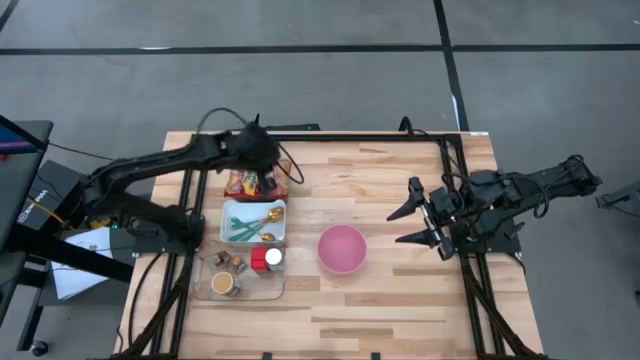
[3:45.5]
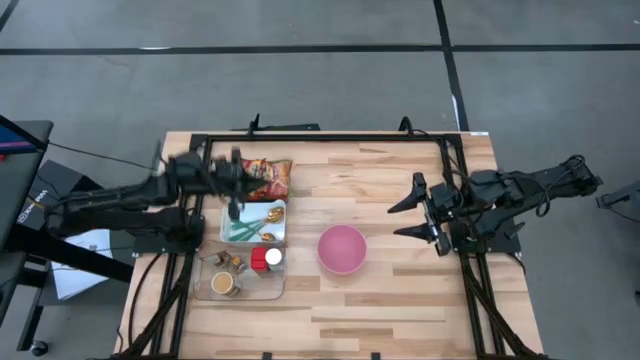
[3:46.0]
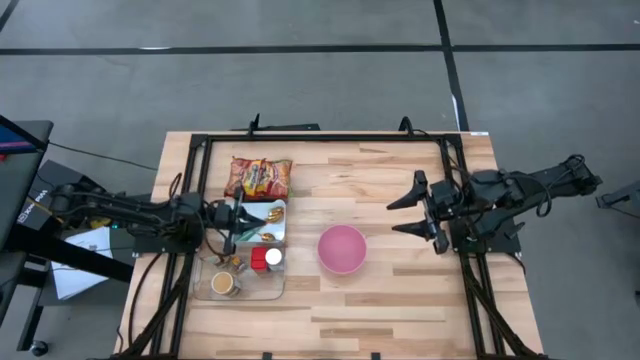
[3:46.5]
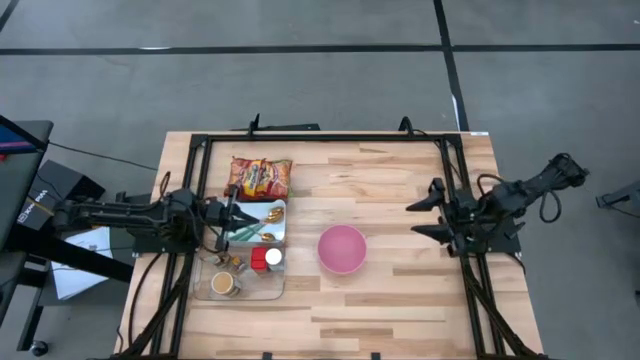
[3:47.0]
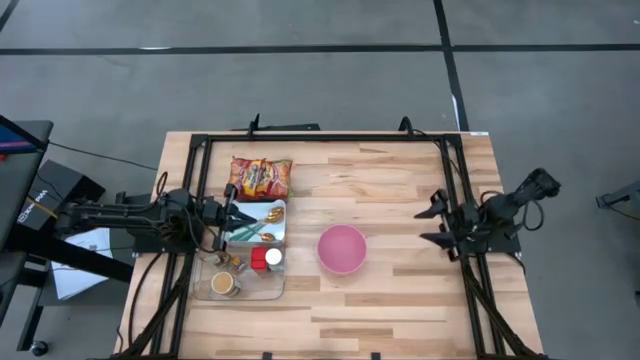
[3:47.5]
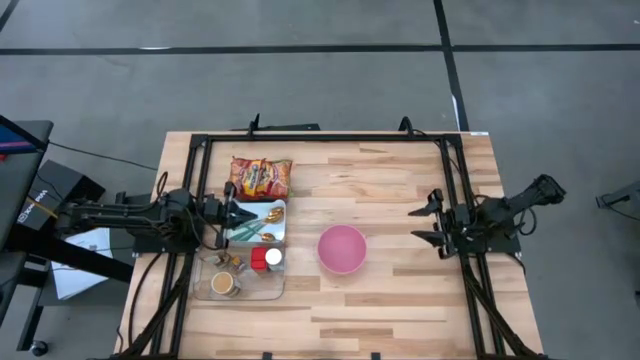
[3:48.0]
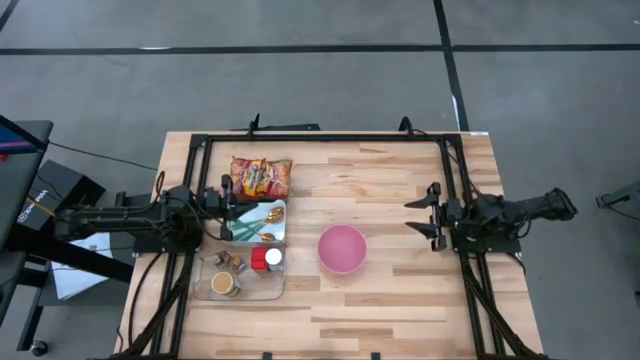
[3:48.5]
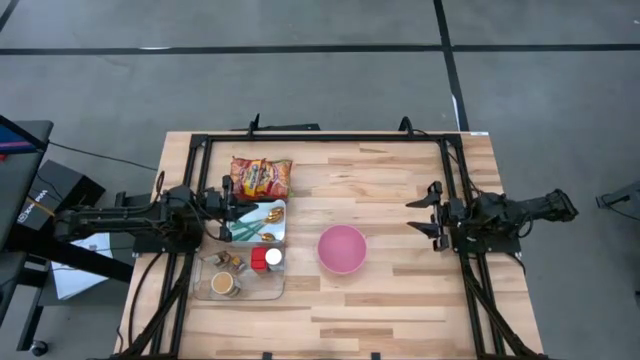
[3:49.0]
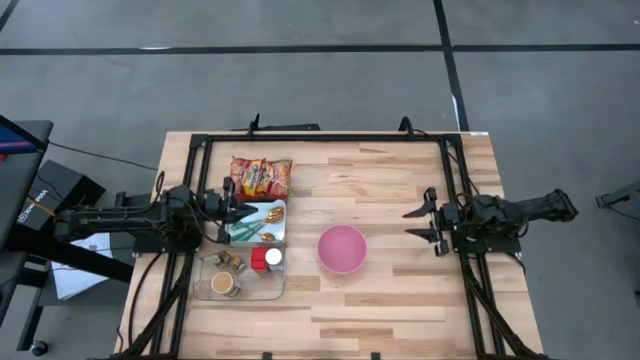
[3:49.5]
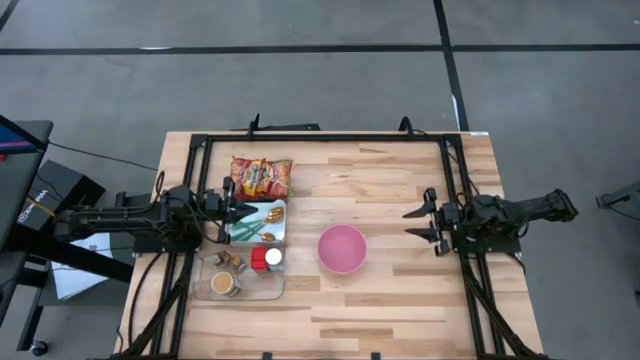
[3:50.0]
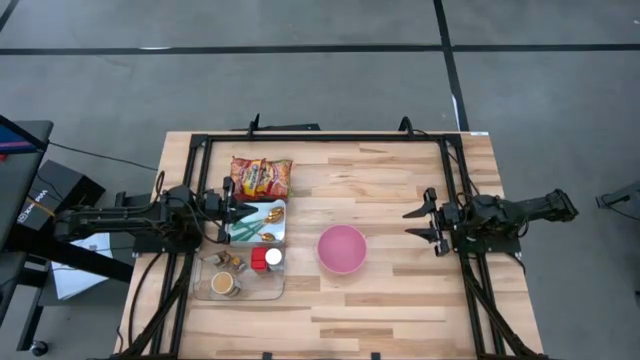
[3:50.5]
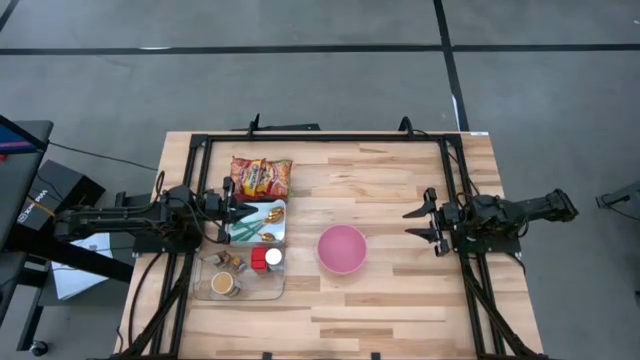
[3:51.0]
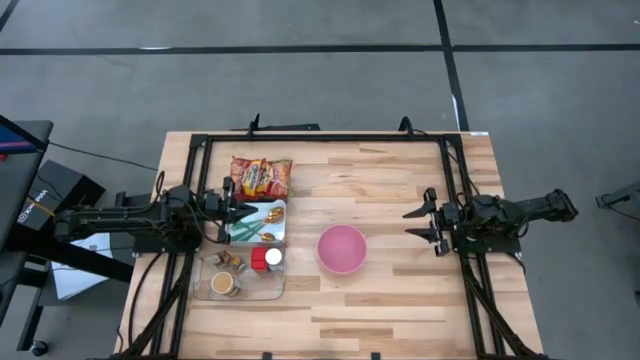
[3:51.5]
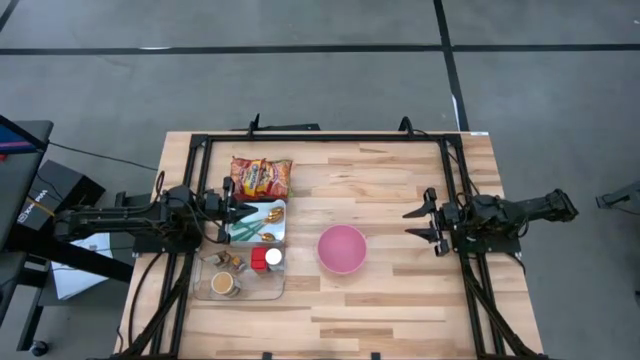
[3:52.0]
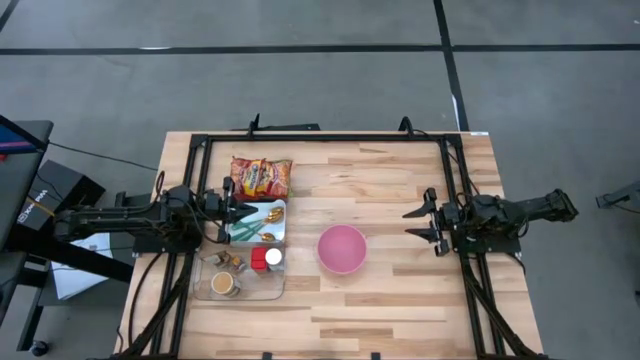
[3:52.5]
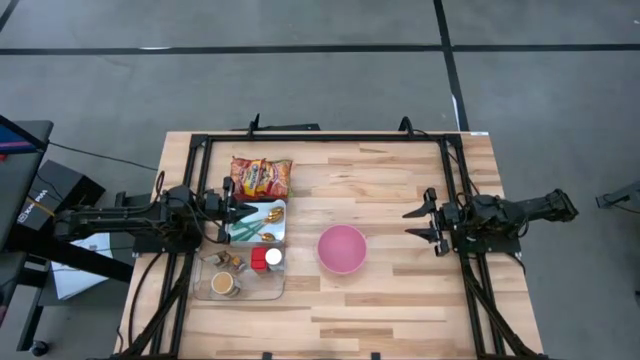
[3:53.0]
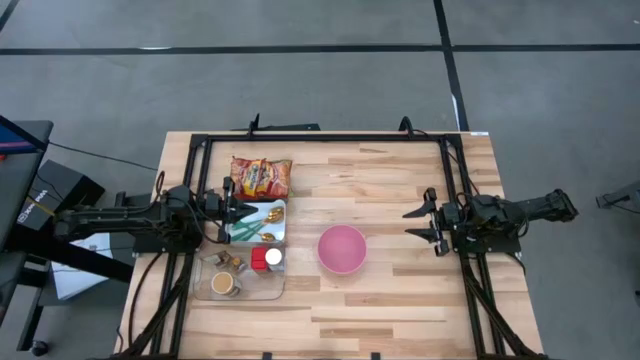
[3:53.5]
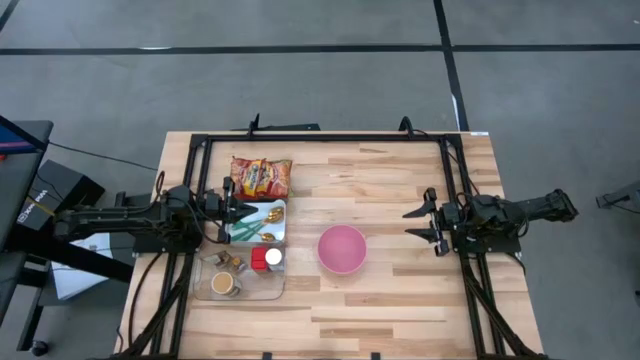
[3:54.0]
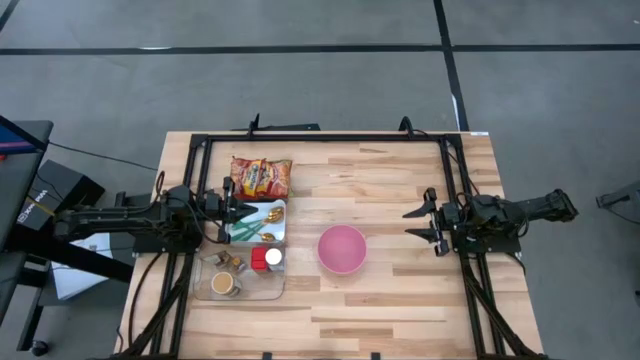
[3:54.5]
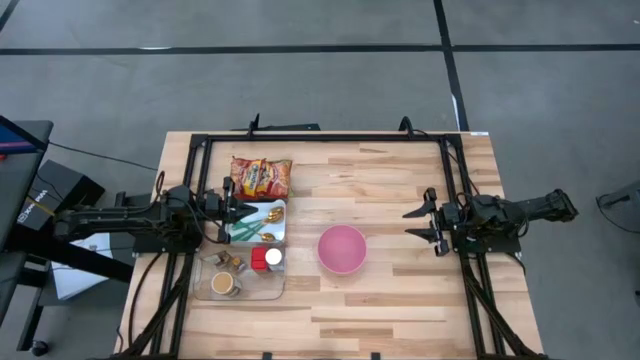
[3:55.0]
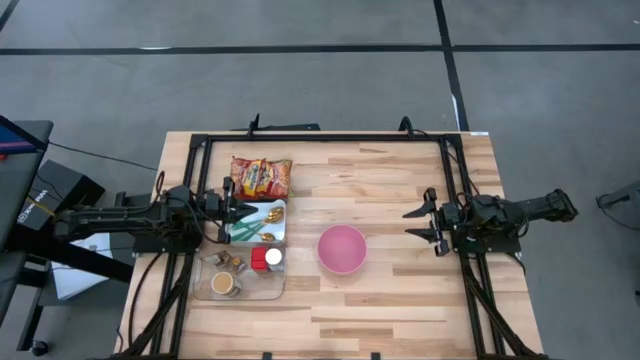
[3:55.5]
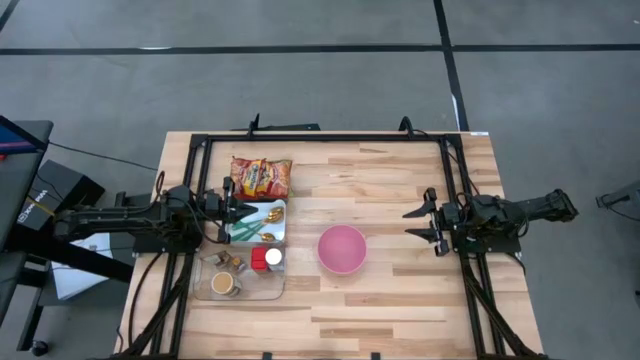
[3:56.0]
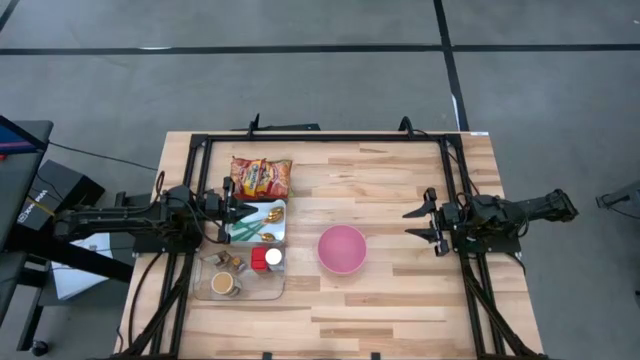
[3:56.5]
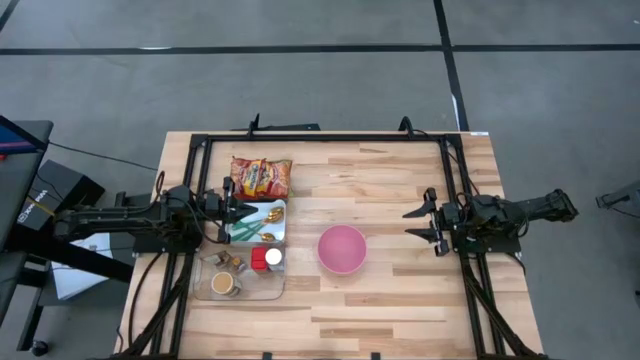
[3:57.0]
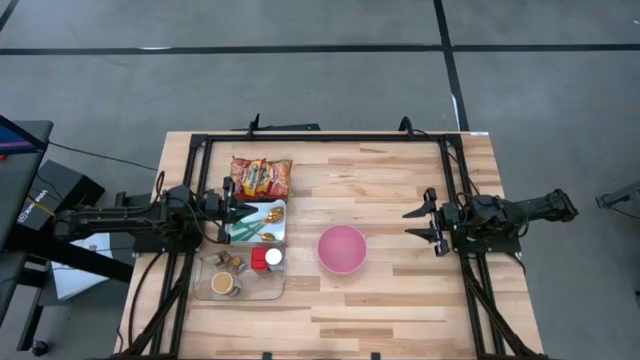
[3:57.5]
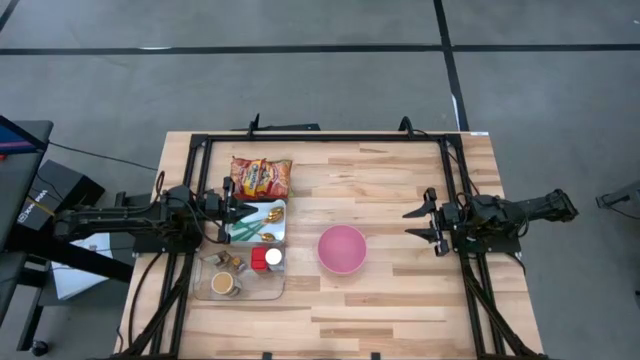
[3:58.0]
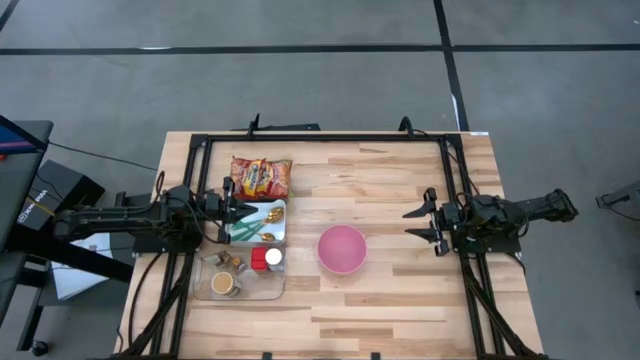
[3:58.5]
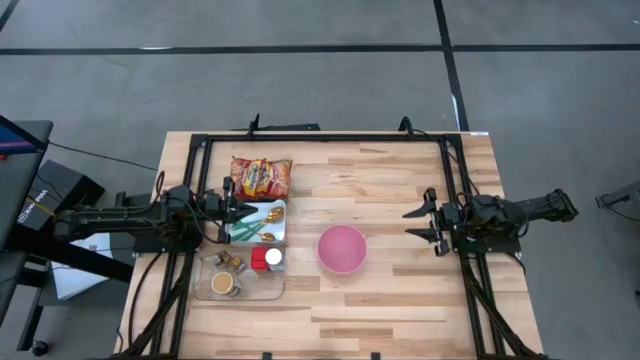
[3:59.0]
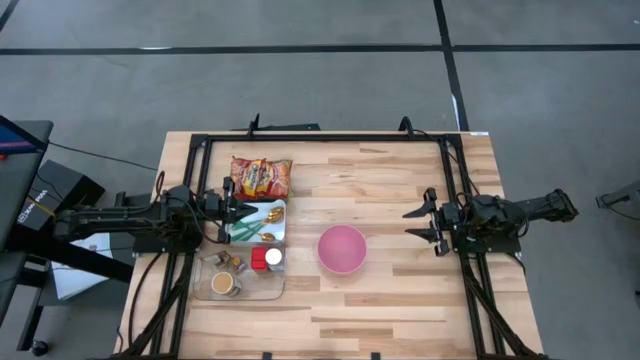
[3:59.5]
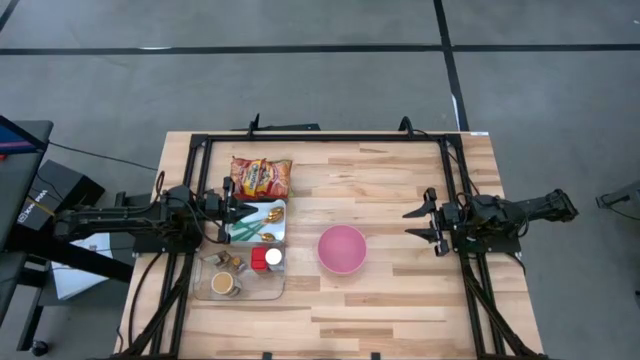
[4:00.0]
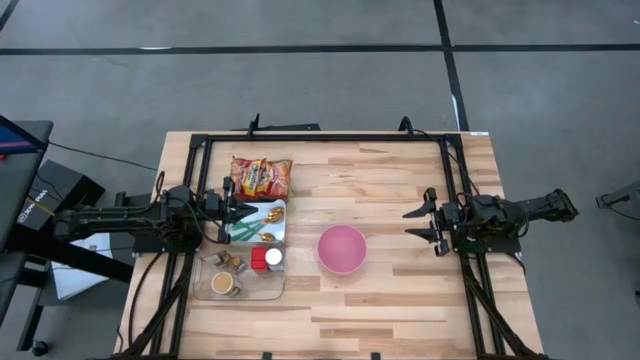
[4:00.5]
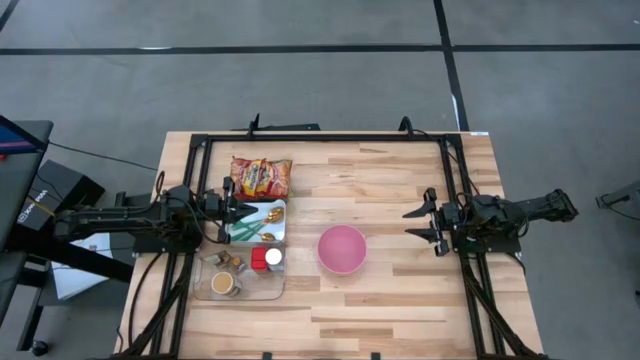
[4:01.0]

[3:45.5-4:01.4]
Task: Pick & Place Food Item
Return to Home Position

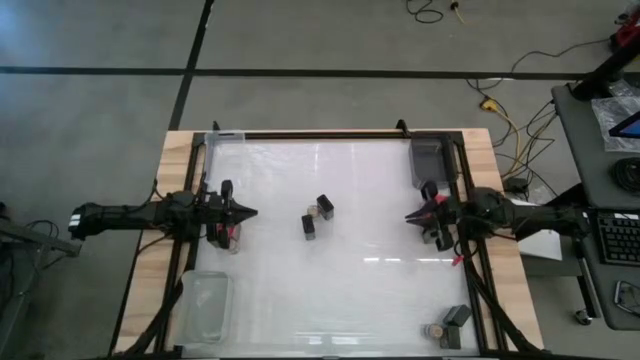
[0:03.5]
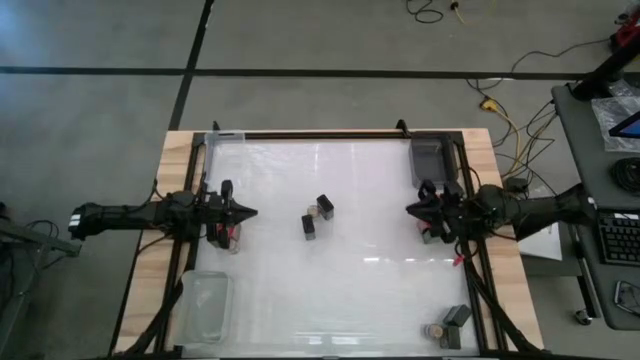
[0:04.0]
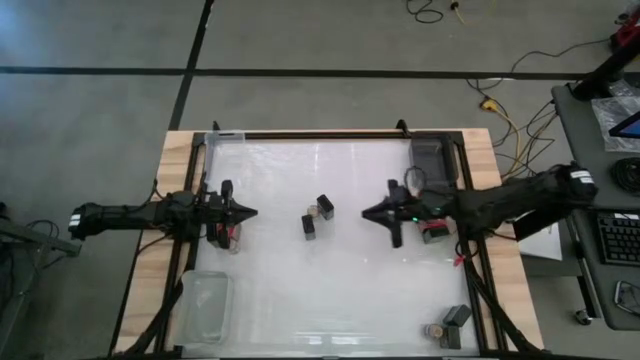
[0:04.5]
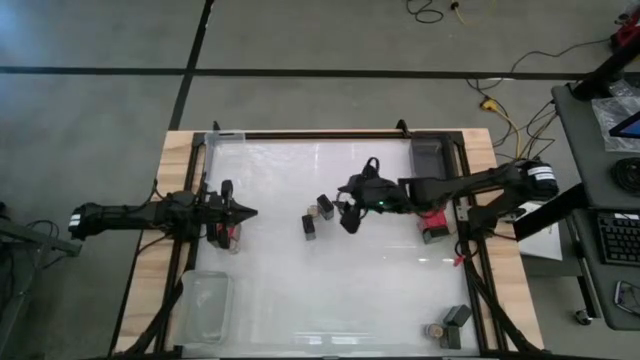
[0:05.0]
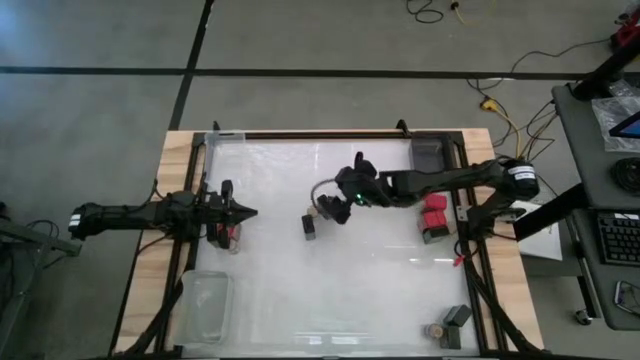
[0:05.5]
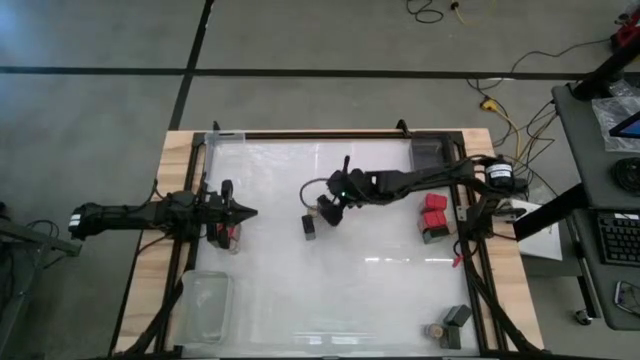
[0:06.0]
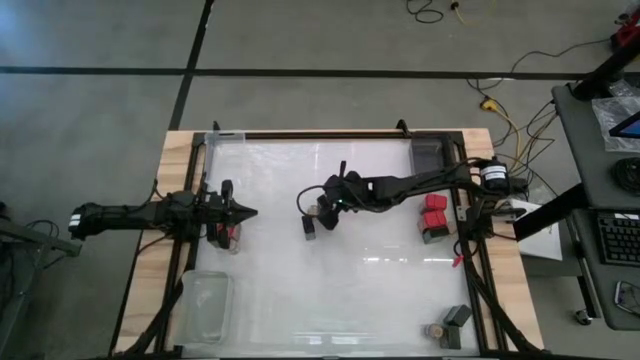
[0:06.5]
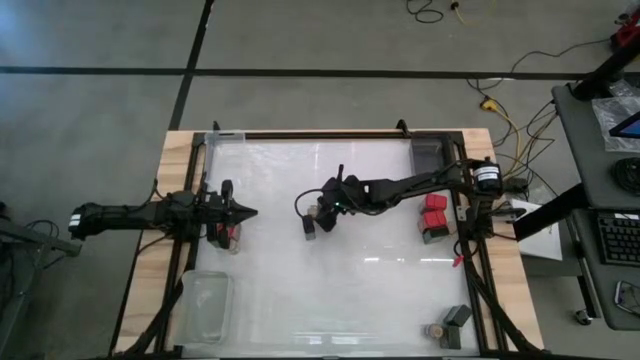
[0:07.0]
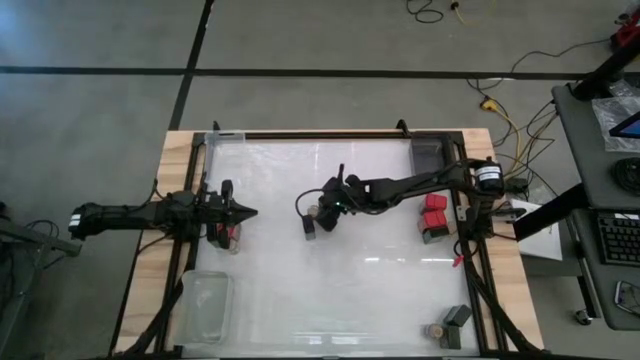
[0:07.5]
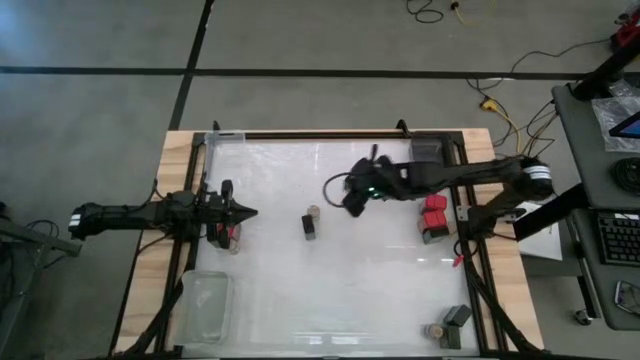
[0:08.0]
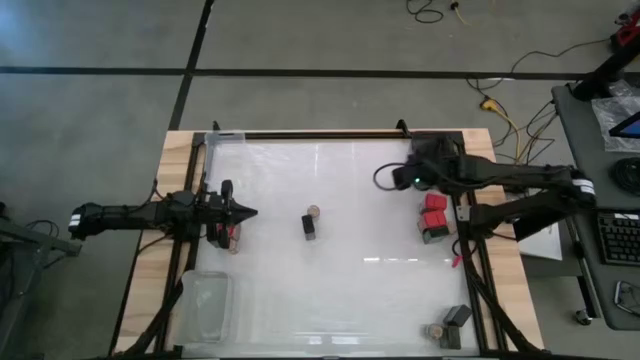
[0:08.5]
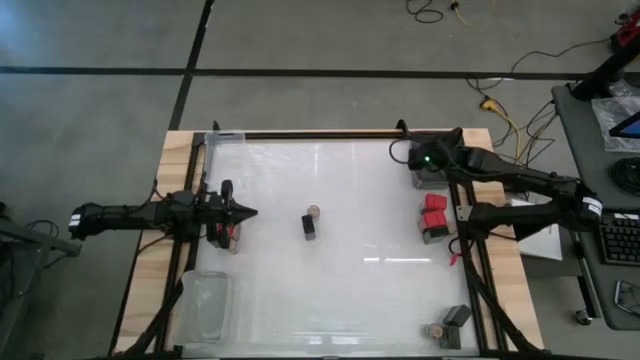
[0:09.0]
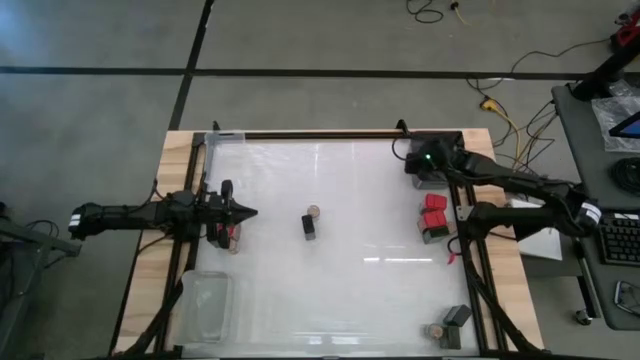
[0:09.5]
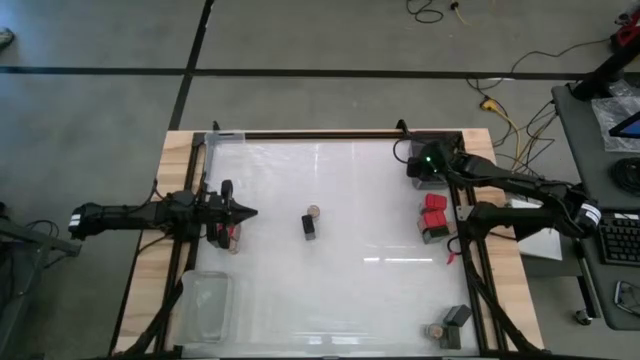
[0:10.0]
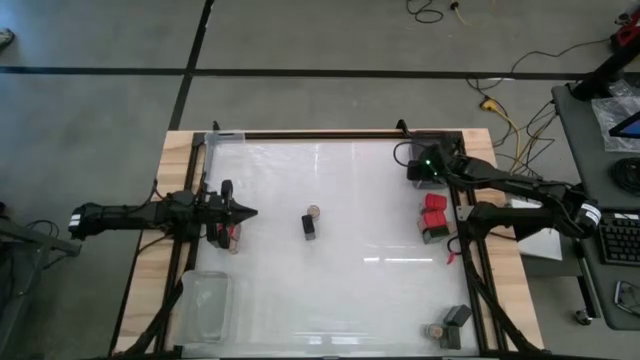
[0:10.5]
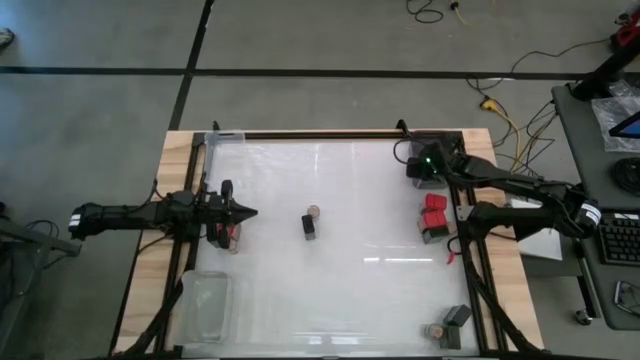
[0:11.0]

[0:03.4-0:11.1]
Task: Sort spices by type
Put the black seasoning can into the black bin
